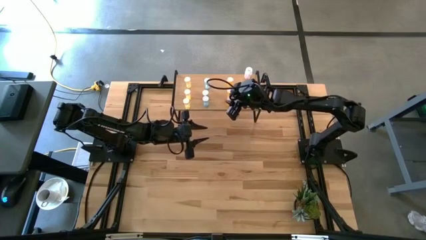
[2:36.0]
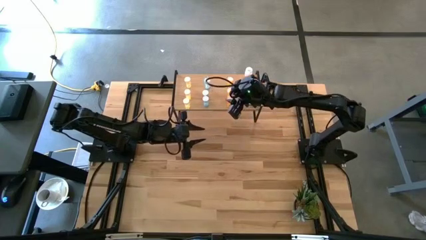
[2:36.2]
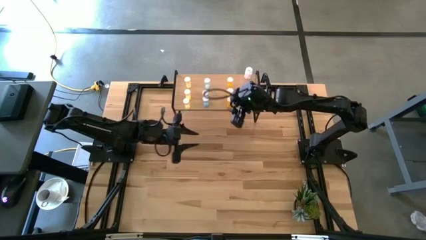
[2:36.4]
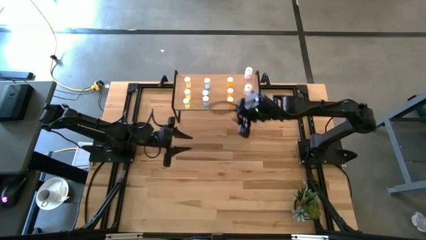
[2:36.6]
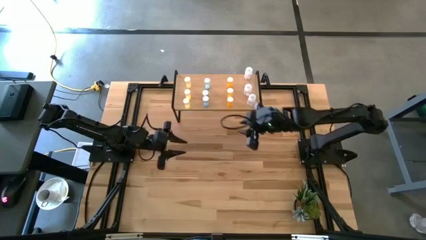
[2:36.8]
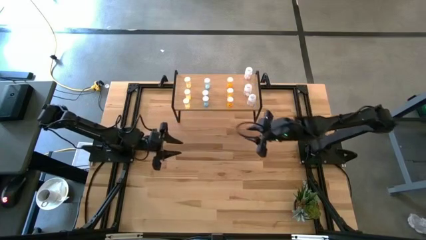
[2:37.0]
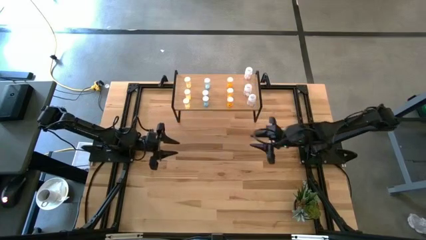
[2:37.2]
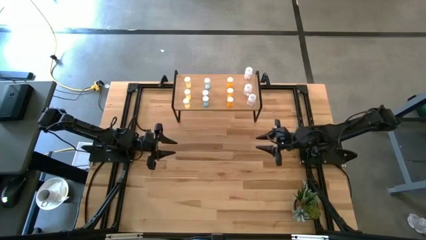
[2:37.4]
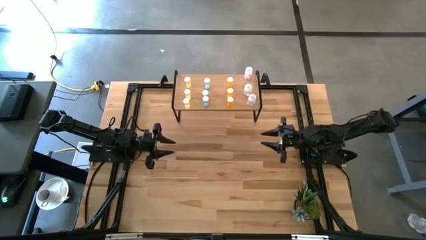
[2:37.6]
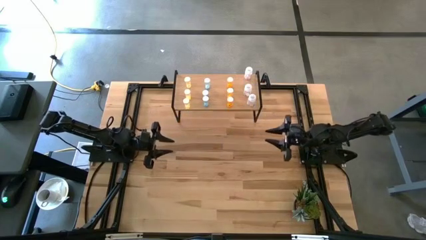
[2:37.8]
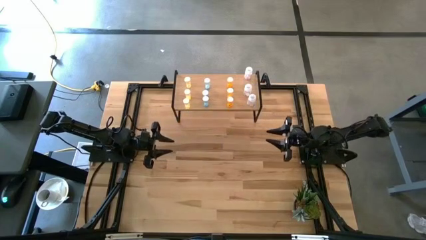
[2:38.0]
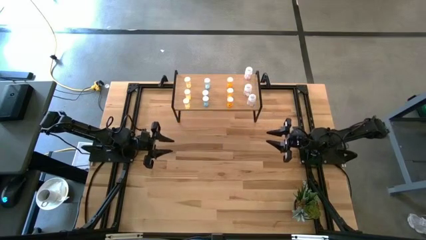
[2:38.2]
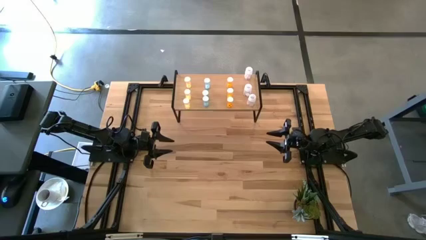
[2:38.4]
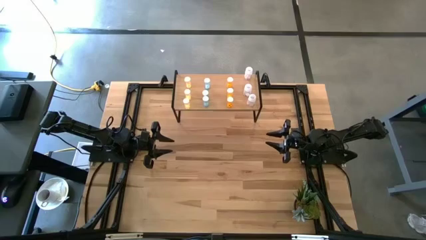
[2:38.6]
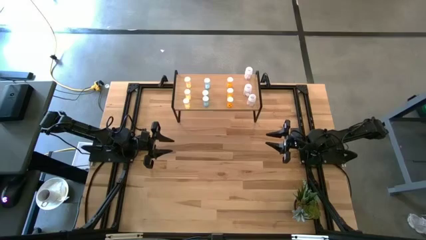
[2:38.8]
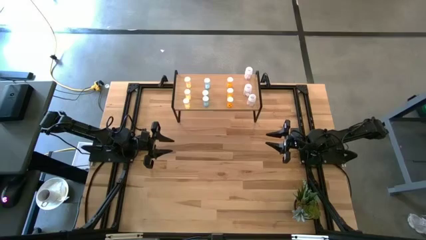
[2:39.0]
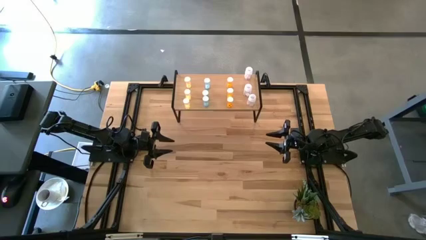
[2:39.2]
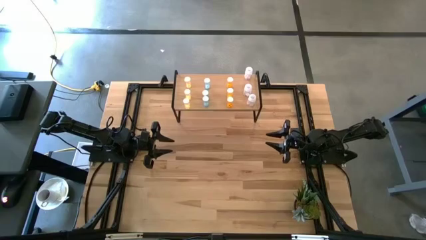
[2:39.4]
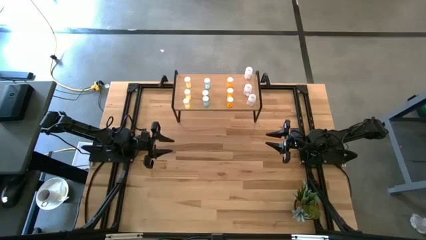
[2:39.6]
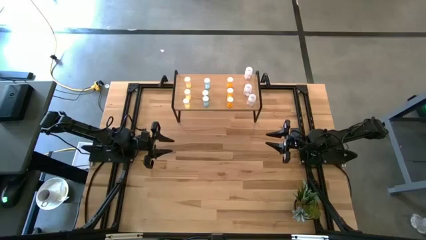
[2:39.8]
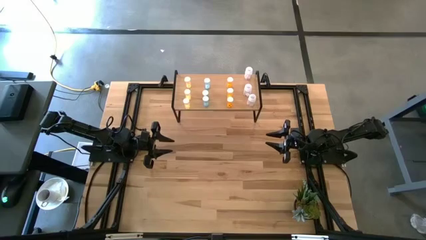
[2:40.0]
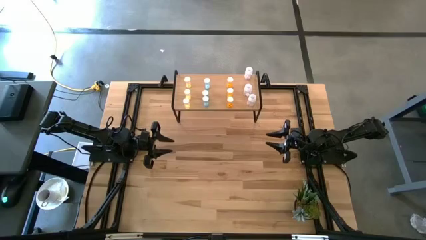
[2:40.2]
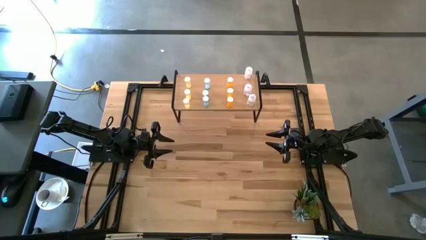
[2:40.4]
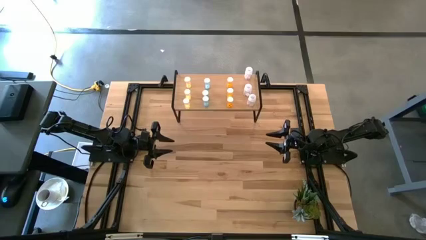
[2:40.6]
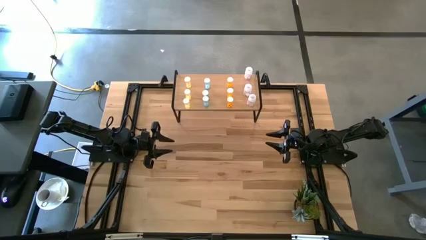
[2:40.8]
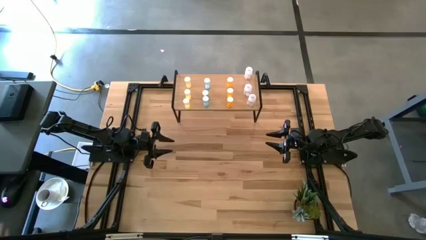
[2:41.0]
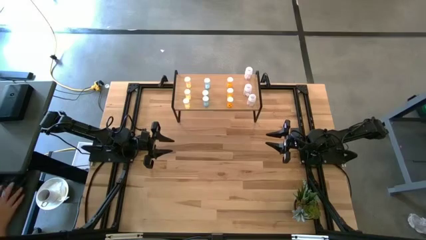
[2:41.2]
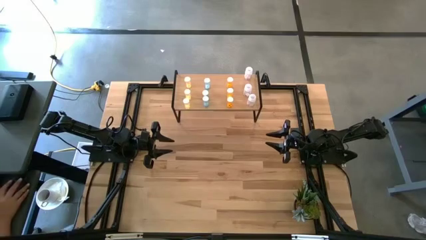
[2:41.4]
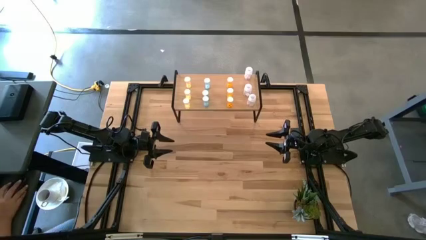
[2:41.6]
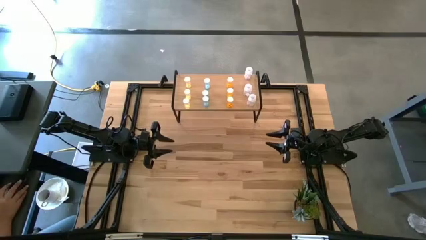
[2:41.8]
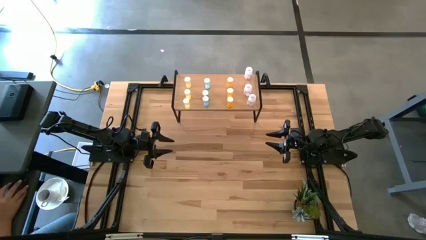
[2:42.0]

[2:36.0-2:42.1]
Task: Pick and place medicine bottles onto shelf by color
Return to Home Position

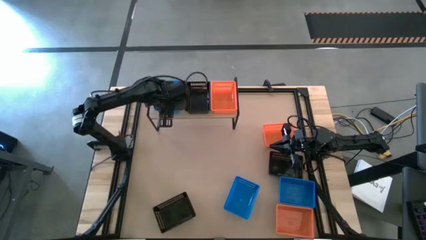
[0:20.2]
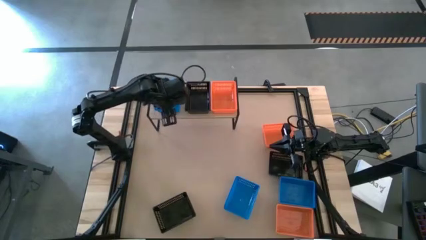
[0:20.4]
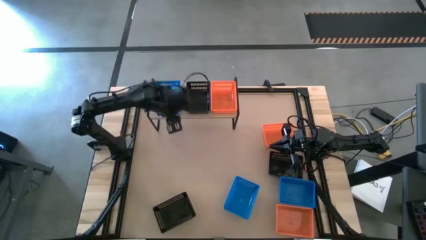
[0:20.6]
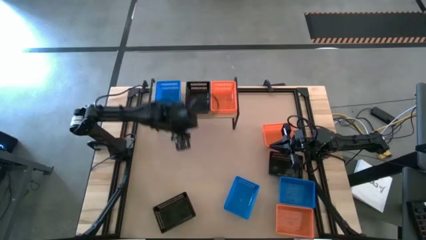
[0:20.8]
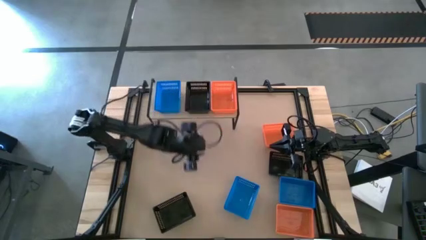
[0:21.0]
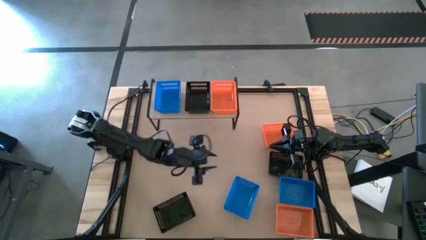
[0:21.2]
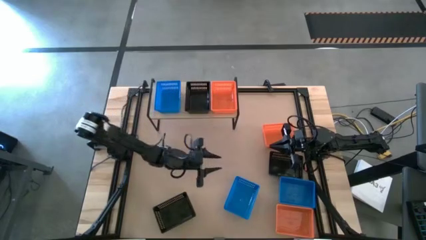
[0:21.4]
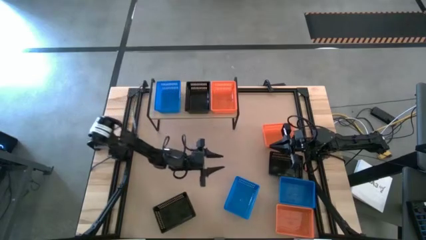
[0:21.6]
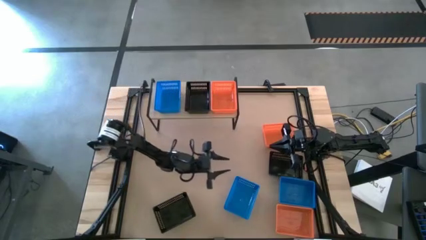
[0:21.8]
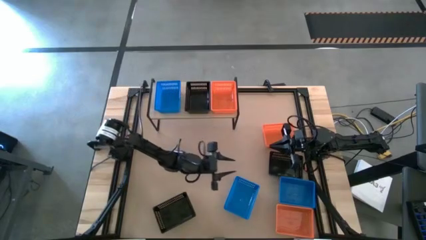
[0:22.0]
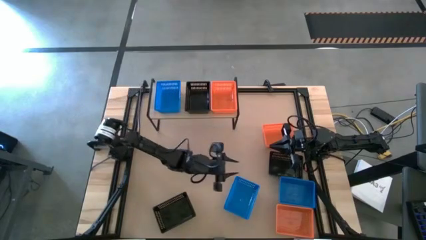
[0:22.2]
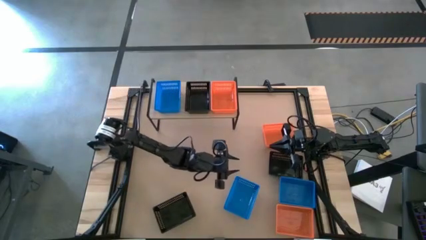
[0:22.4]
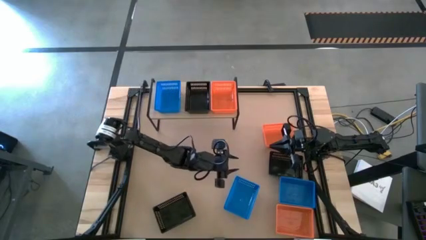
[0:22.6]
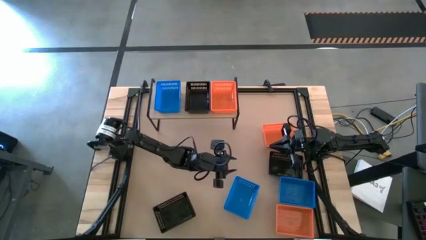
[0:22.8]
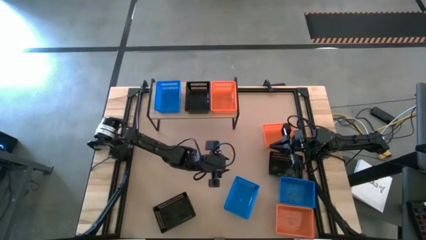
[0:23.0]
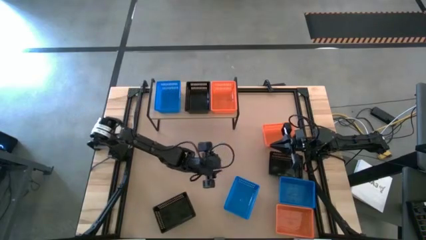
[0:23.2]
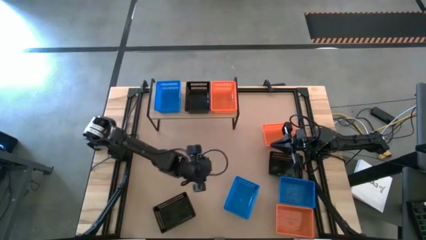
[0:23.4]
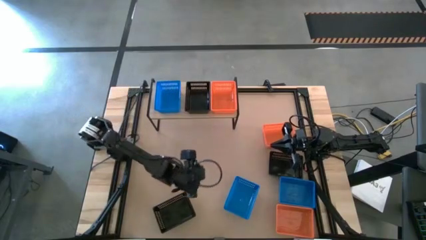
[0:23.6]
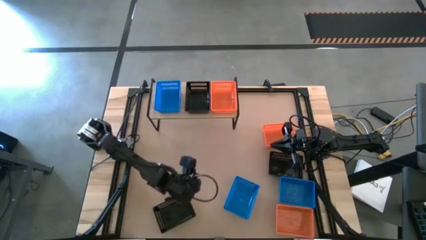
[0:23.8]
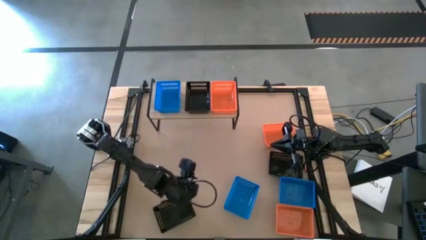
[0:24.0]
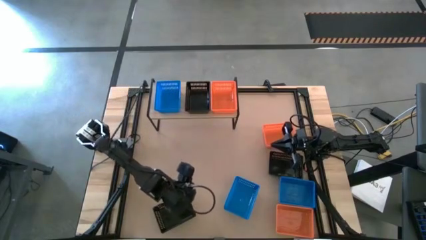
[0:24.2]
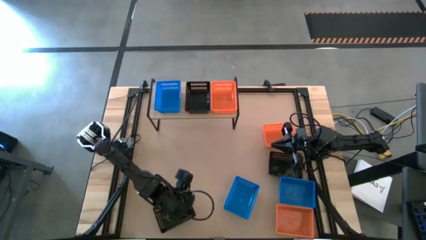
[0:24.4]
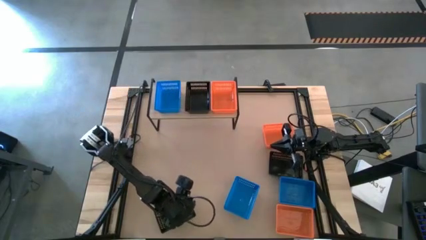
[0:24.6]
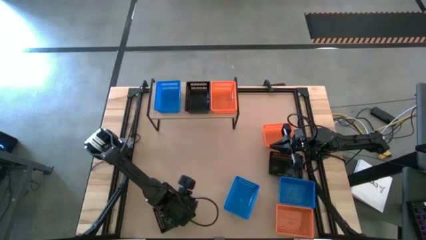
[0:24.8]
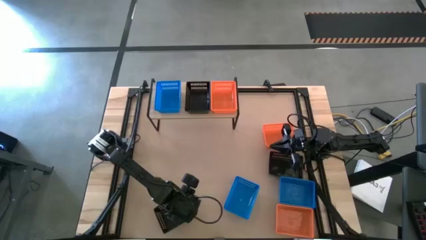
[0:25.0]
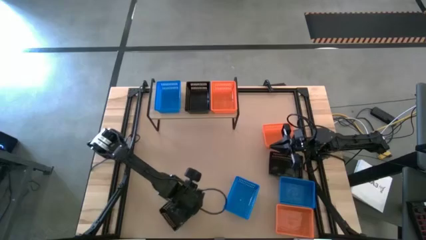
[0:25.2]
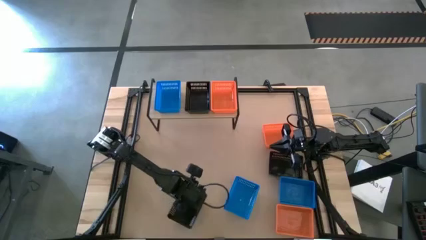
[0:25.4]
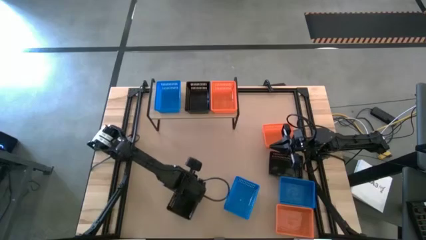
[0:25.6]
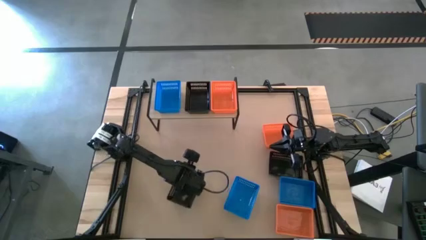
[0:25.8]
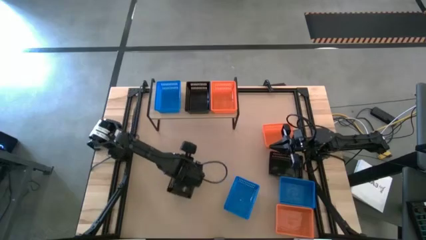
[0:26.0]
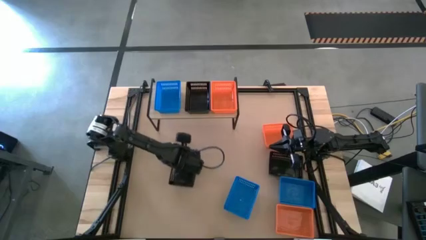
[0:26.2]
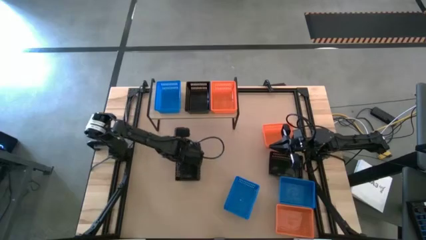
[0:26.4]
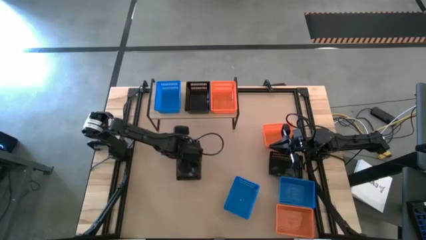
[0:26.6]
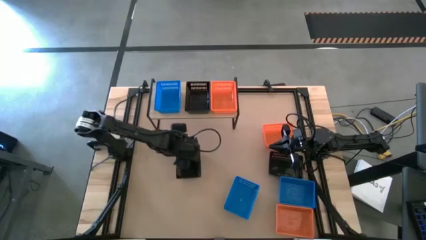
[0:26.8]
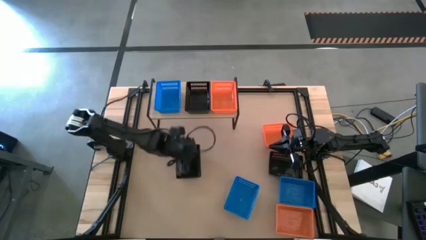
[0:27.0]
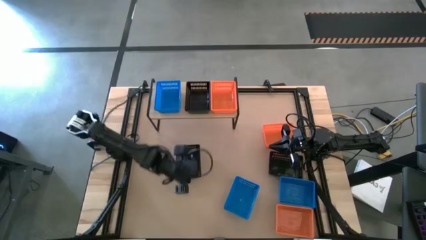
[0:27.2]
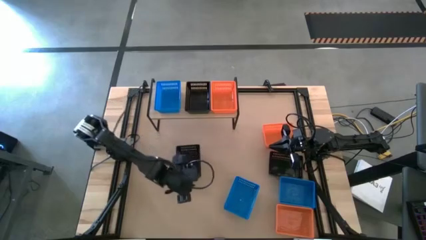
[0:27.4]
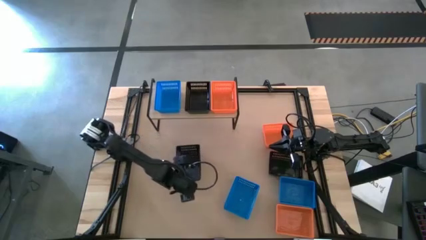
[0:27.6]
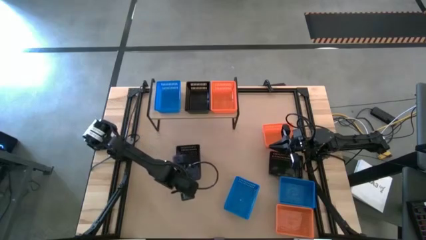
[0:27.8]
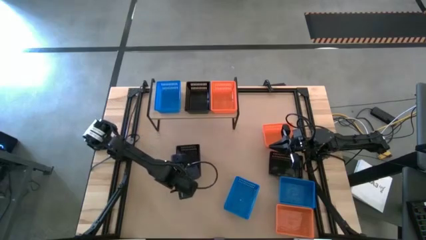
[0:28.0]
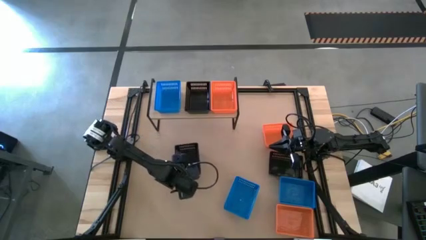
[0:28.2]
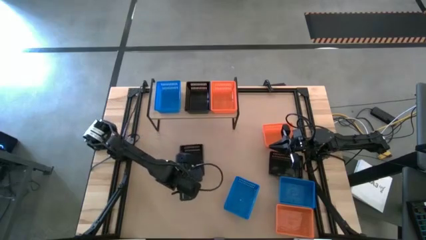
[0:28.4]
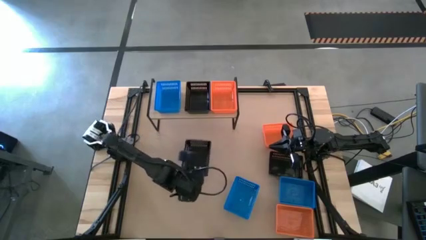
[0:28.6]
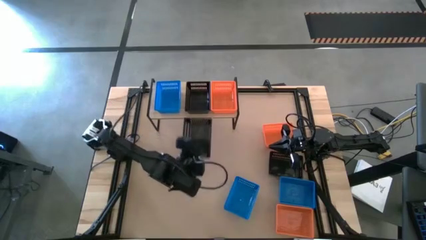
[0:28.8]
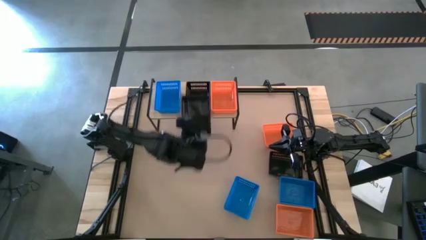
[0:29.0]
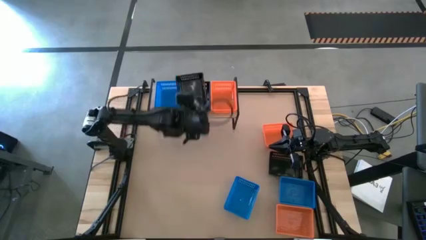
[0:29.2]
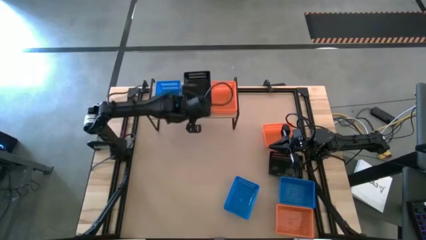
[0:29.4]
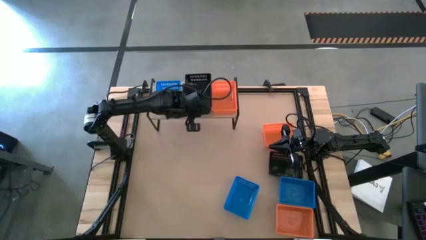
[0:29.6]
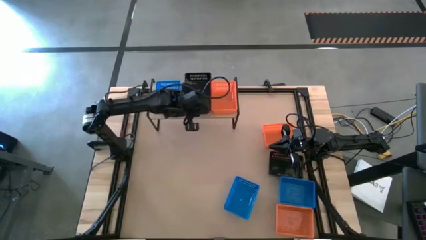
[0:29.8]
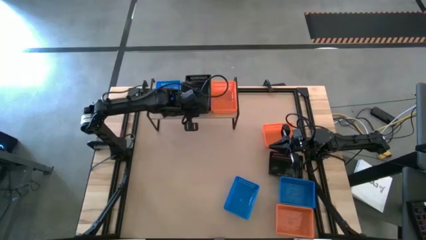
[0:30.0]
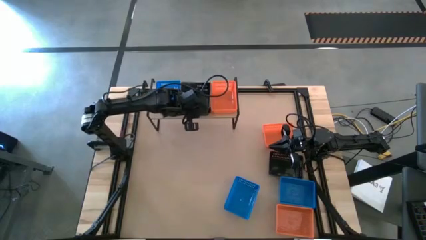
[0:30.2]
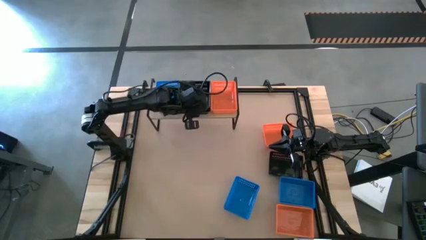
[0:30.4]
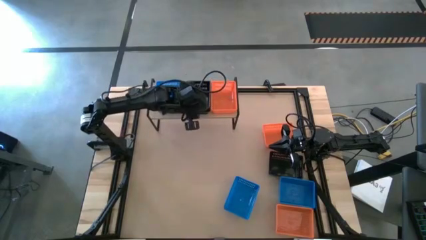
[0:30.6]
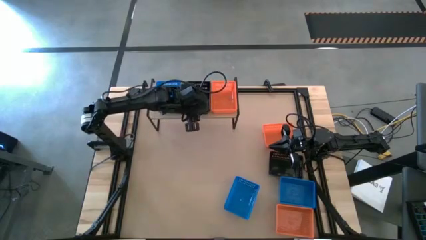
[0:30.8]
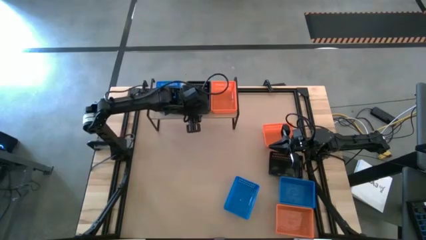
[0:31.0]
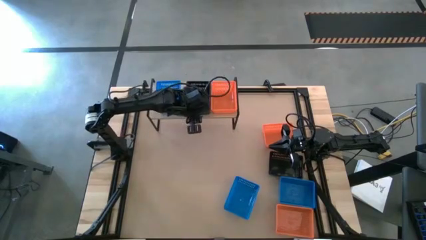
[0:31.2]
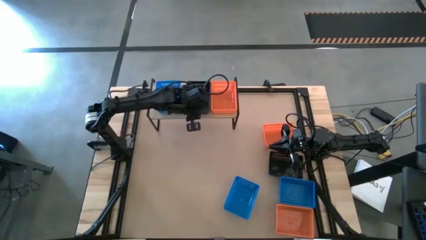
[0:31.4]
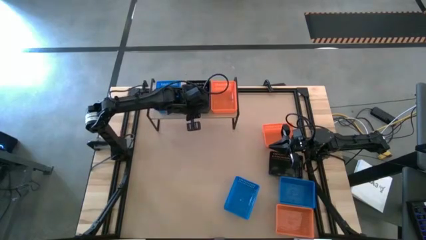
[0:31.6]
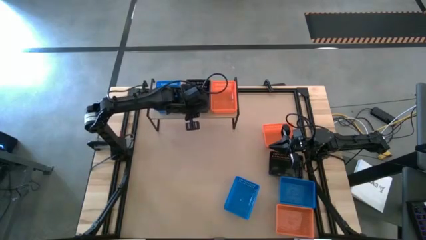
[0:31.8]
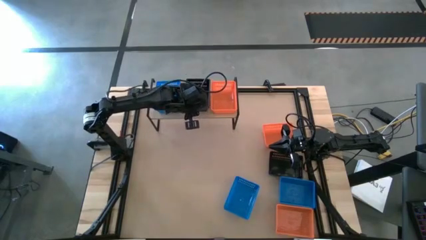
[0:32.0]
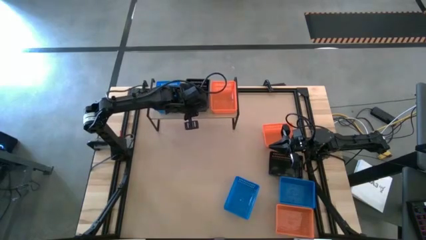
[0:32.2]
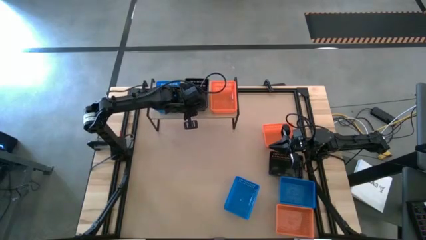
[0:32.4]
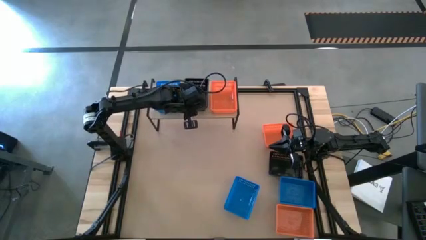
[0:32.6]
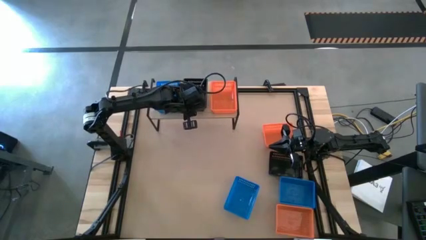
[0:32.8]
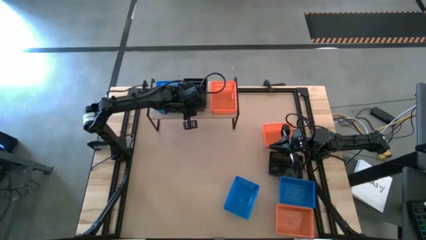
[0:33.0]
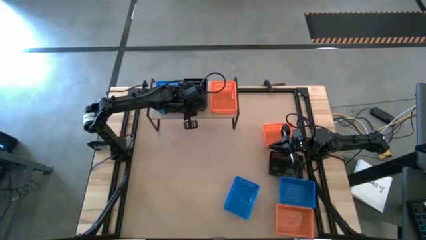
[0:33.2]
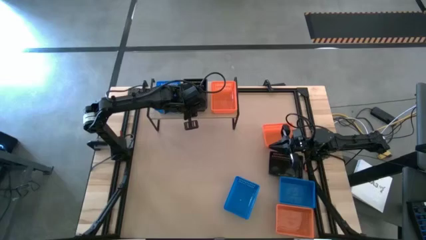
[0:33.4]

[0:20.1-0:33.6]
Task: Stack baskets on shelf by color
Stack the left black basket on top of the black basket on the shelf
